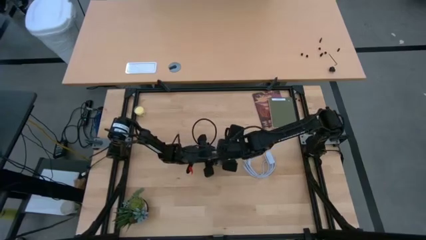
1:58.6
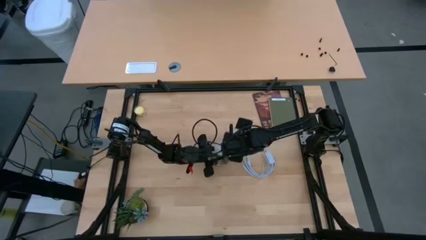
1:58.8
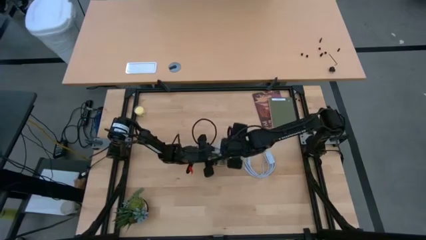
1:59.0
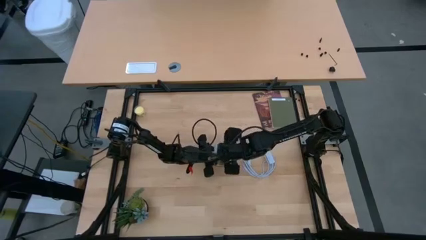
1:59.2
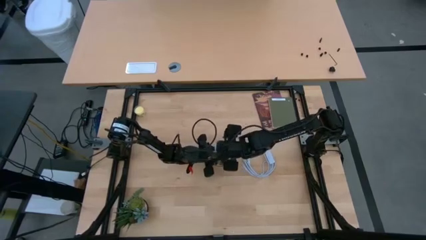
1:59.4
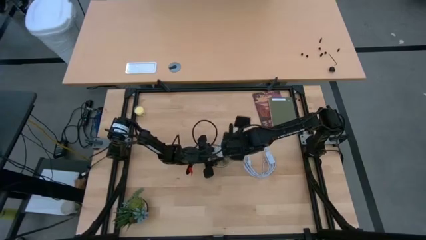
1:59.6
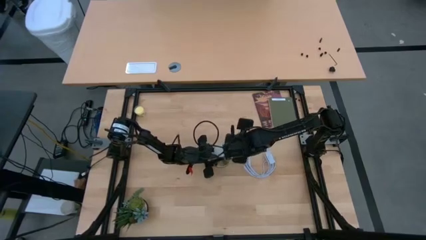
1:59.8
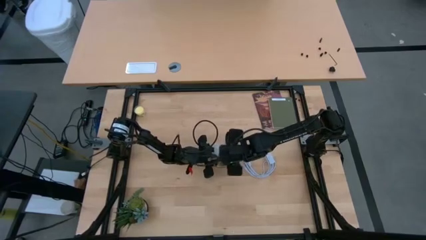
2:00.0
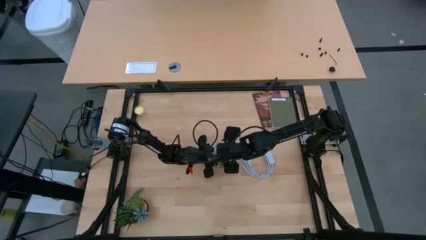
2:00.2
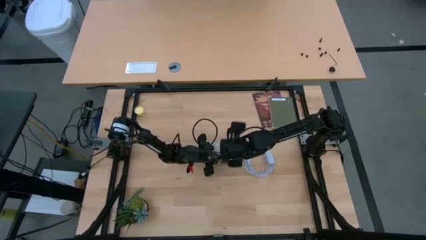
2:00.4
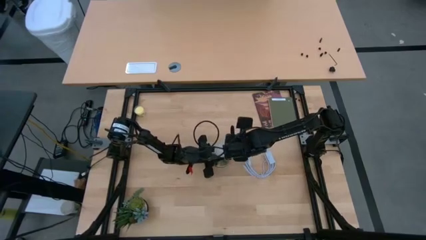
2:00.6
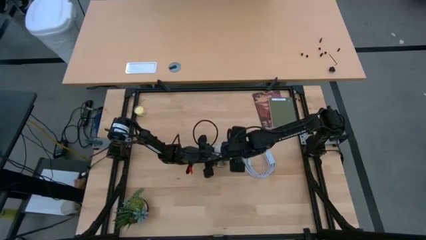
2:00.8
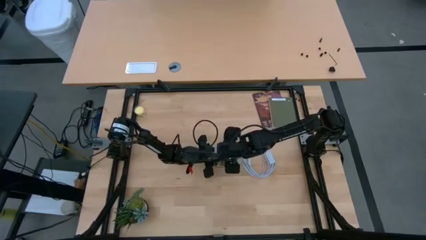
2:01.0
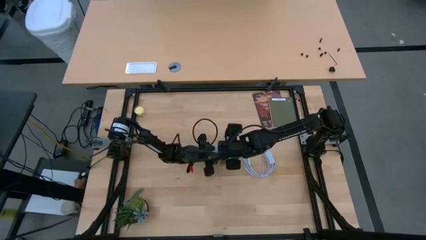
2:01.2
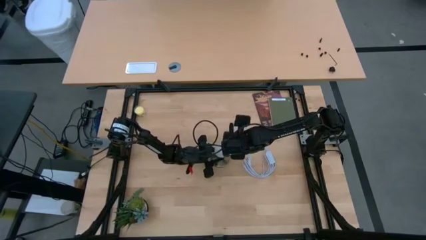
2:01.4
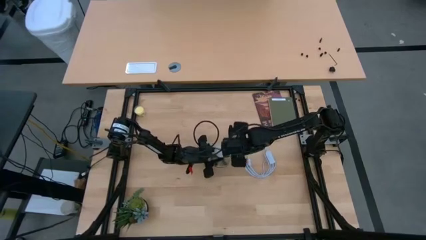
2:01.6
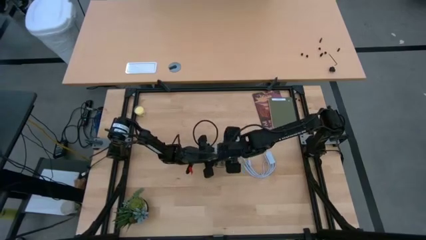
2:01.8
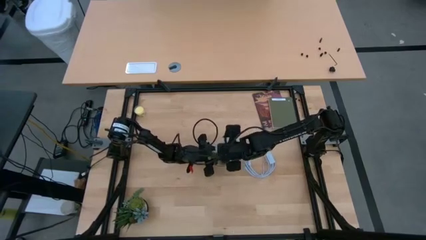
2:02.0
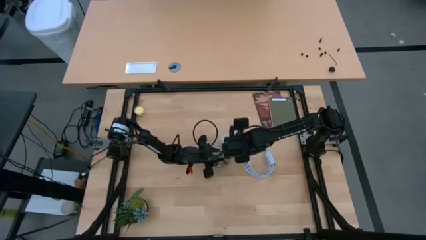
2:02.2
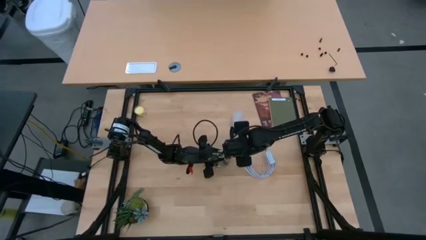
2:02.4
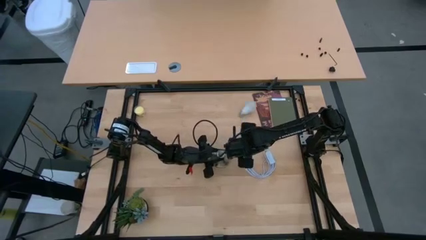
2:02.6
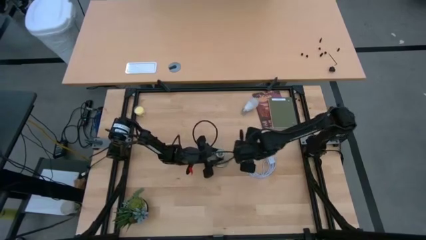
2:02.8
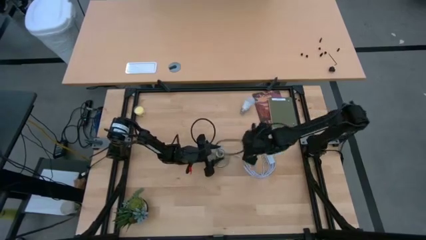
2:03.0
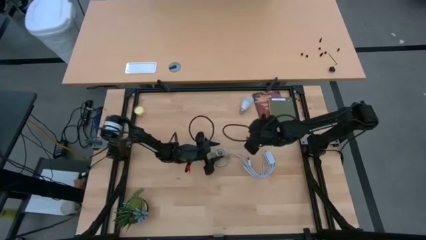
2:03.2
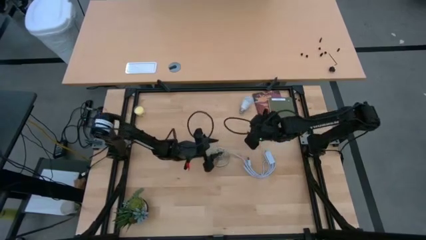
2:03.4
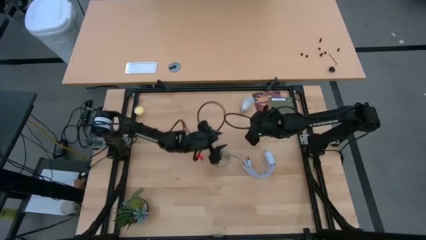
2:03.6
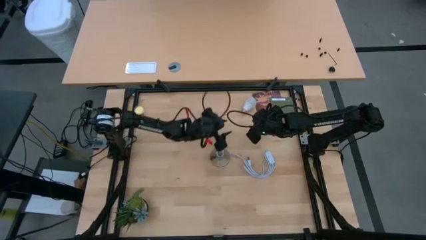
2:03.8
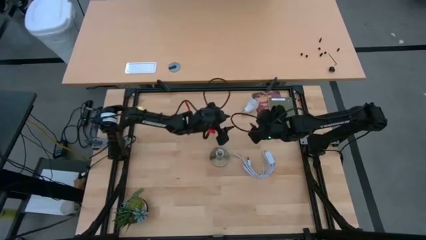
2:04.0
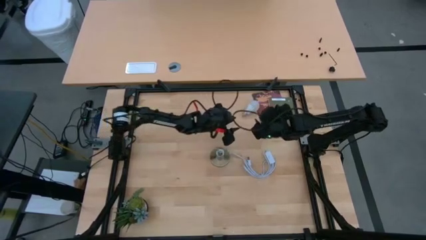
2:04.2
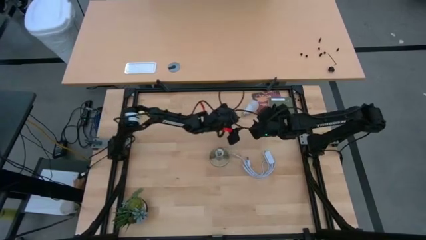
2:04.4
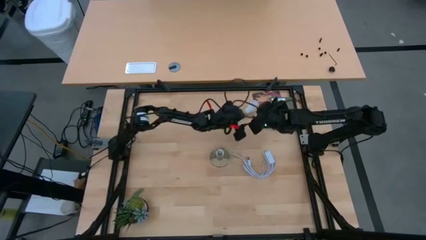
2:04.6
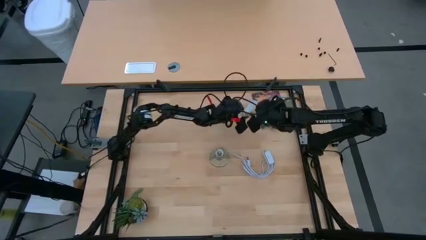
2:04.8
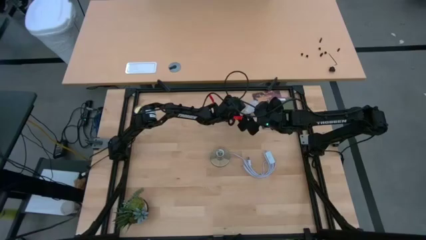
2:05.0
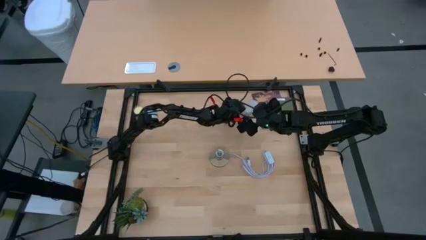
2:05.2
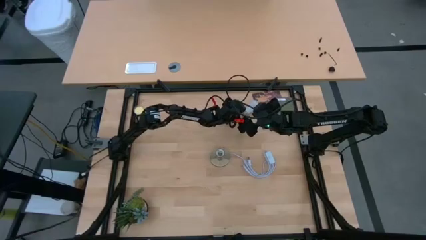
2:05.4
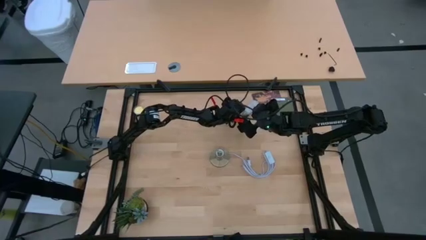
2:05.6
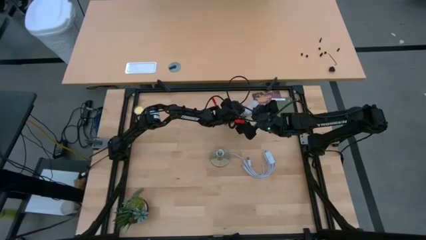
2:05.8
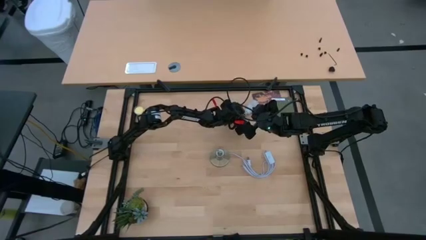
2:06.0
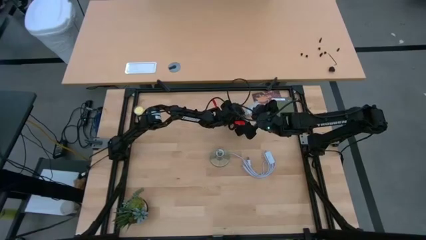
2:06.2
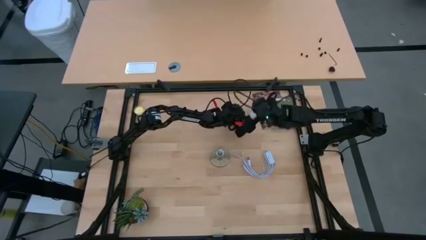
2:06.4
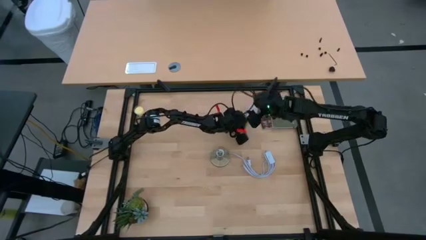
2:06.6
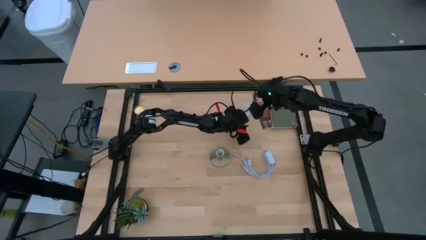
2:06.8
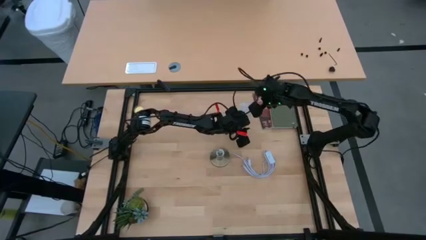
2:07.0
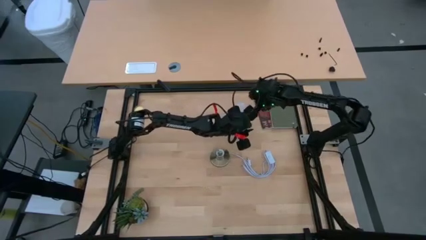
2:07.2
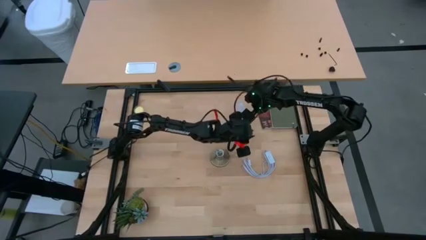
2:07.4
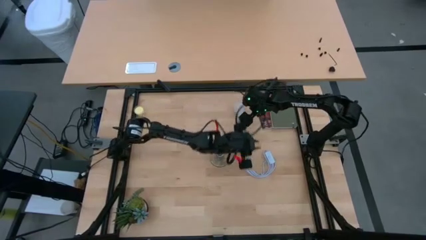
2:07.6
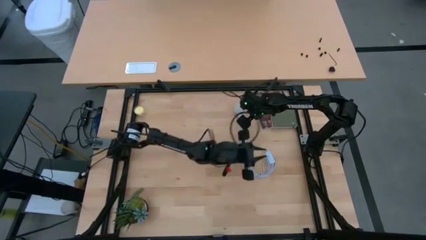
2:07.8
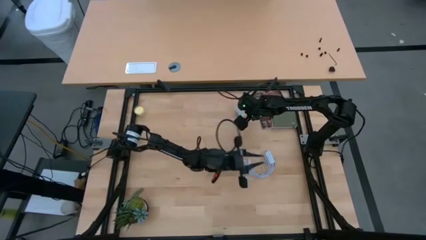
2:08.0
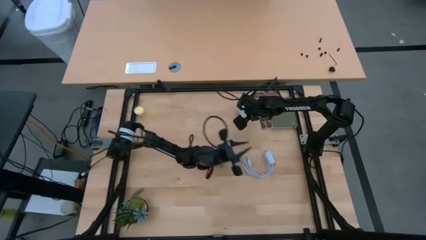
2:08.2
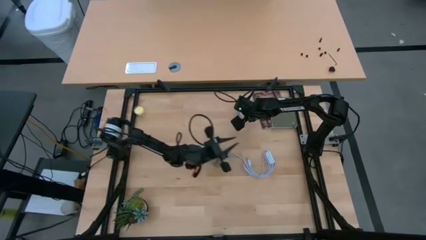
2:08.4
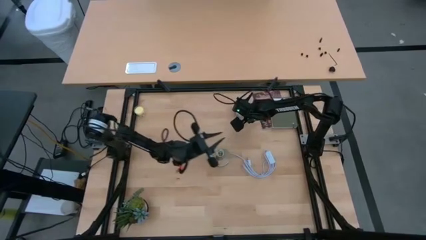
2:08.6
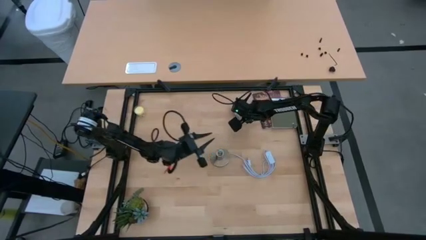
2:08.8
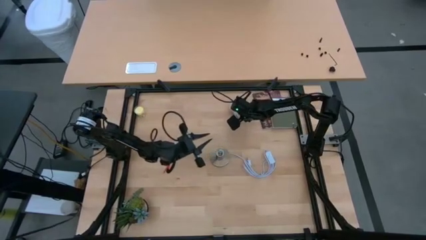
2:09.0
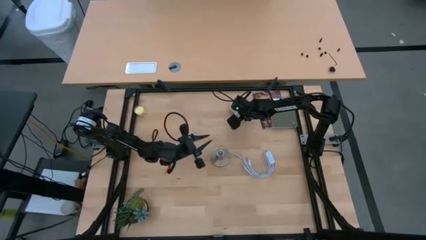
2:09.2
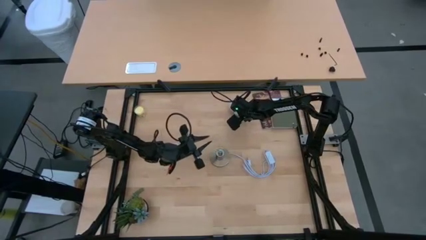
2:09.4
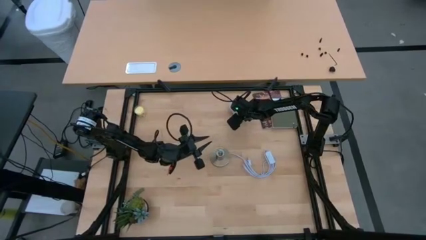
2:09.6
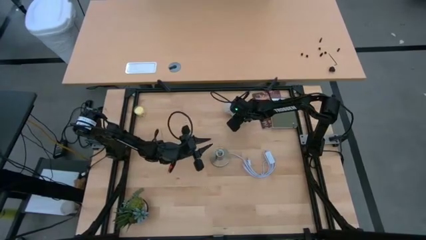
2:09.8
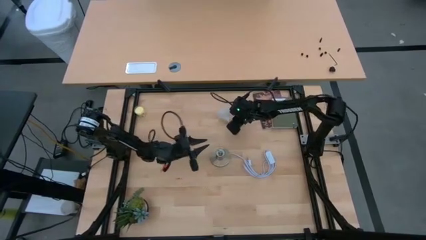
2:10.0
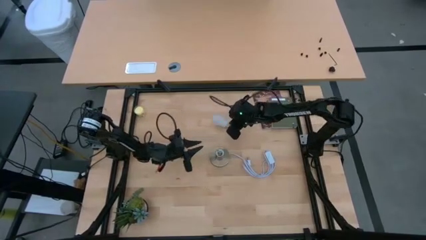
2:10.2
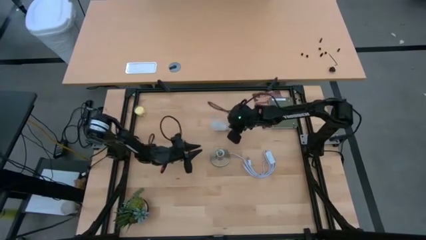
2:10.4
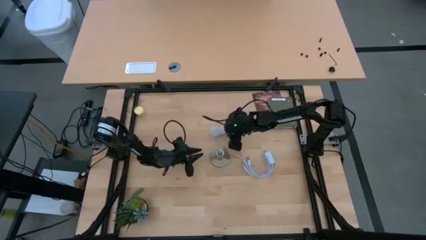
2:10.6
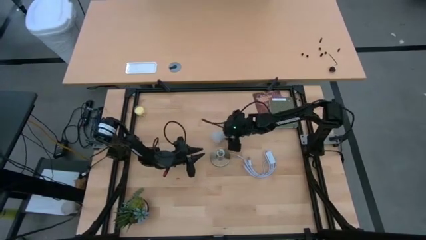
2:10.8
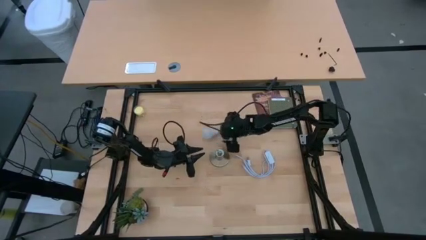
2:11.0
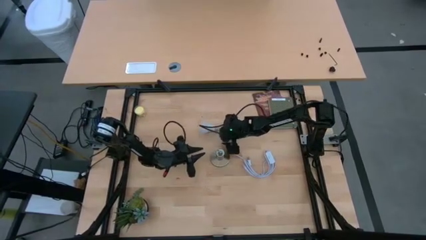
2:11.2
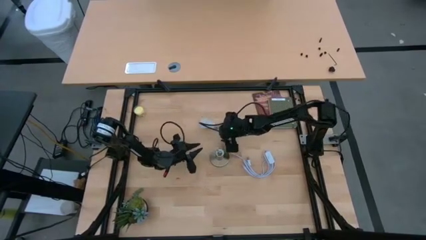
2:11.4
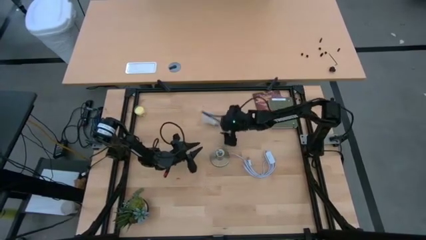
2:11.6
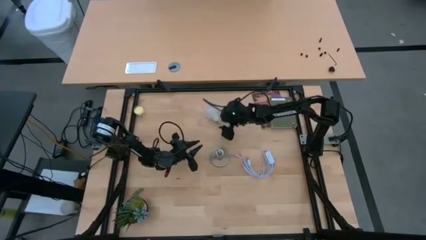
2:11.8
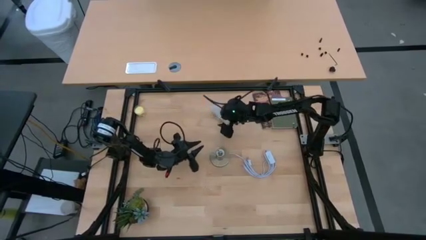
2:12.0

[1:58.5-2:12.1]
Task: Screw lightbulb
Remove the lightbulb from the lamp

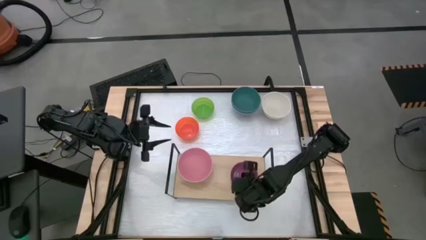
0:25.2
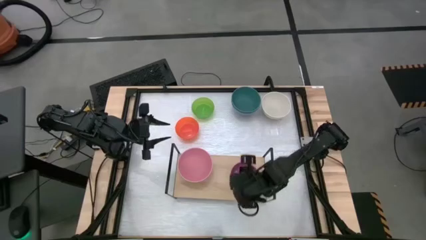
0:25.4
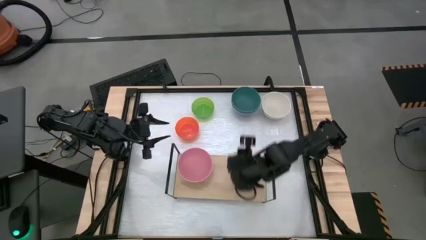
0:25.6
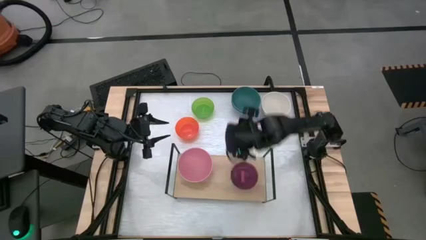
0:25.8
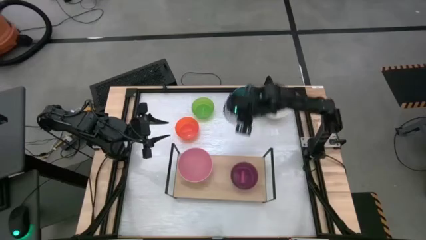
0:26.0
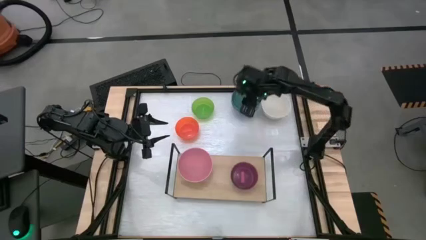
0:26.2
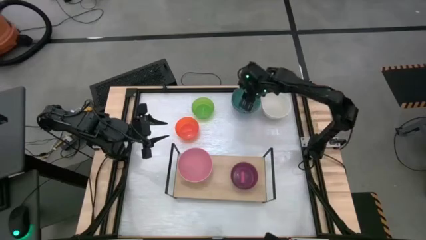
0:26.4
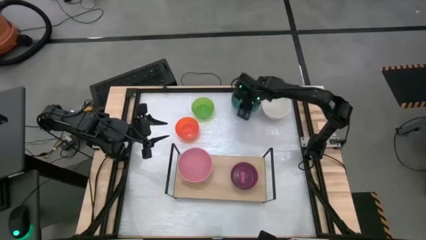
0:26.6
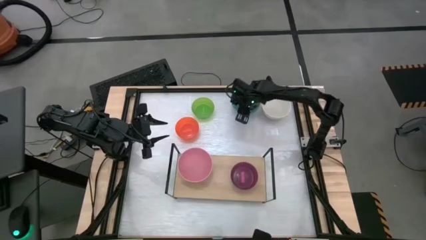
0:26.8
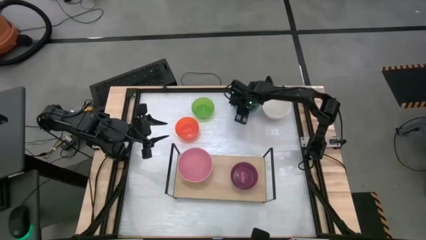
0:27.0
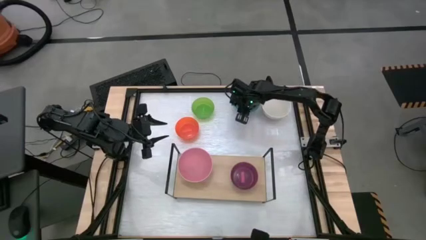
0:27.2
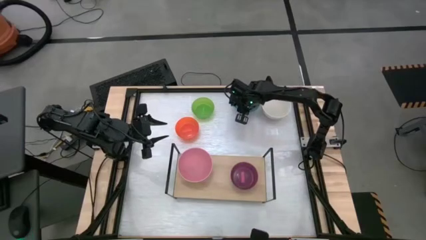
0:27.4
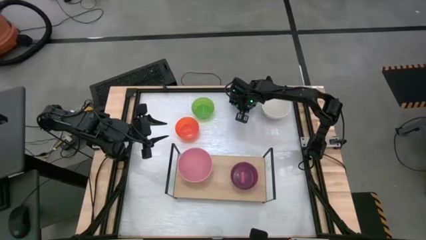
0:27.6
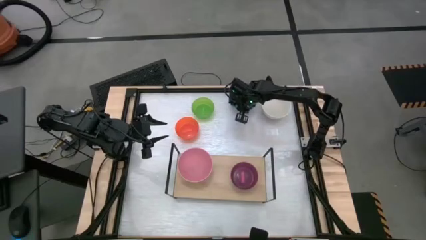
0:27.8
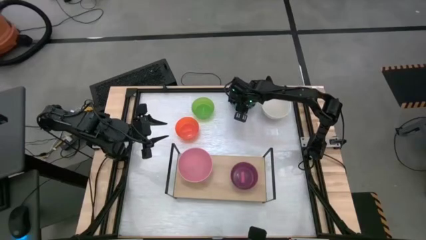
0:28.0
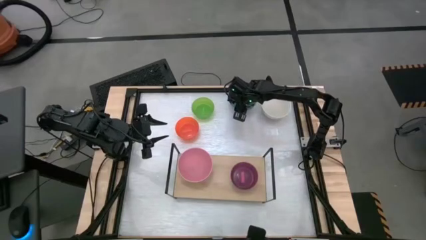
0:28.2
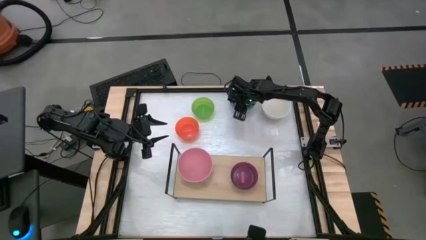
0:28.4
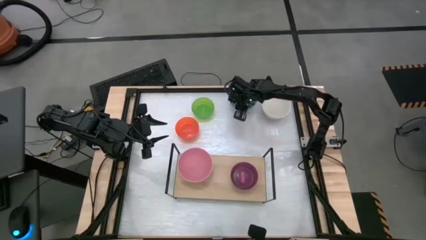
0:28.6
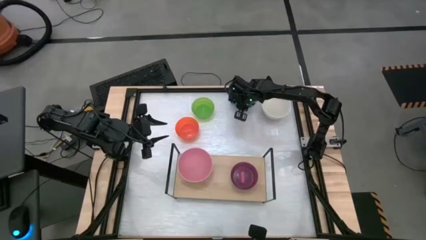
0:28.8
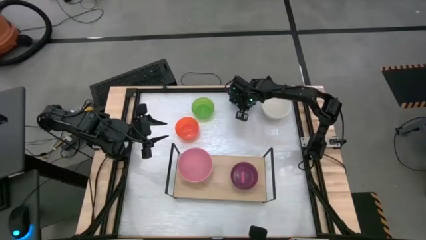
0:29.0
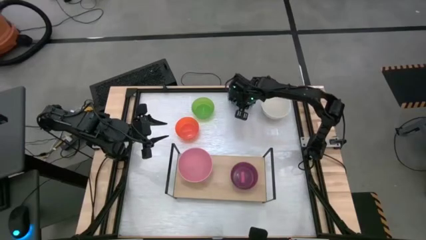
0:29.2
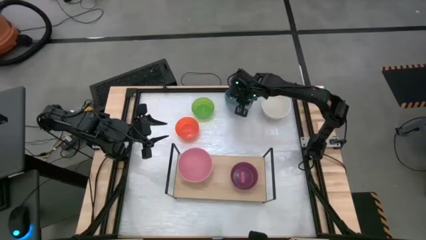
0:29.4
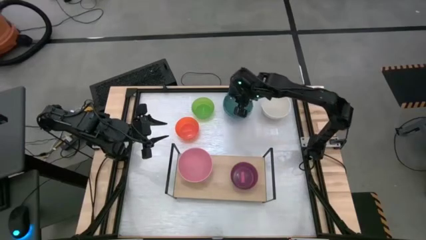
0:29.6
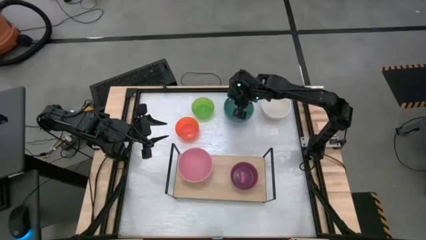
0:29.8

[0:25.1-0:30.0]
Task: Place and stack bowls onto a shelf
Stack the big dark green bowl on top of the big pink bowl on the shelf
